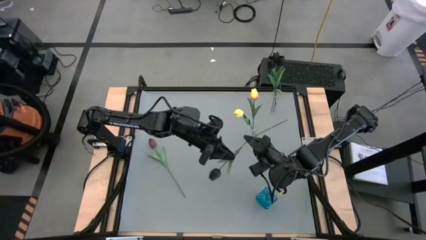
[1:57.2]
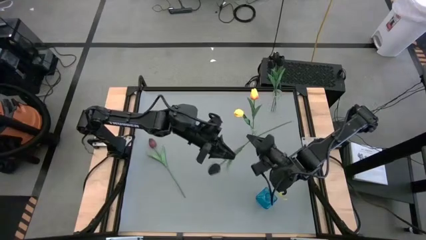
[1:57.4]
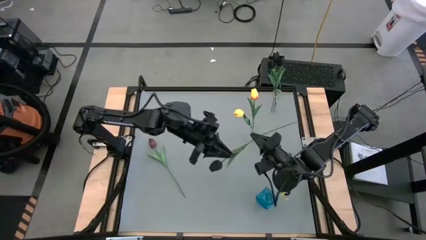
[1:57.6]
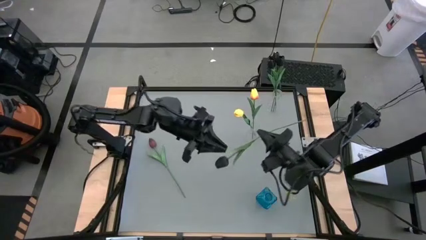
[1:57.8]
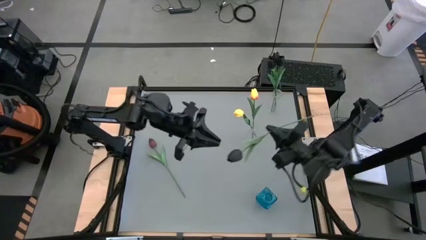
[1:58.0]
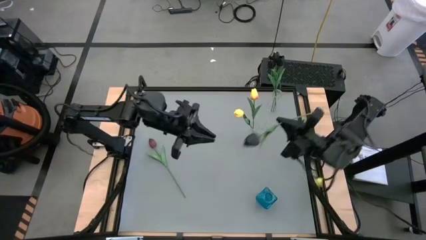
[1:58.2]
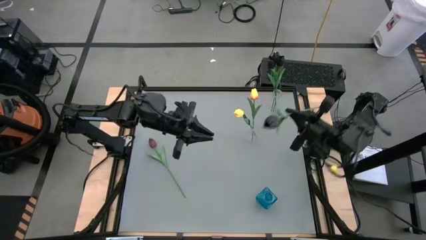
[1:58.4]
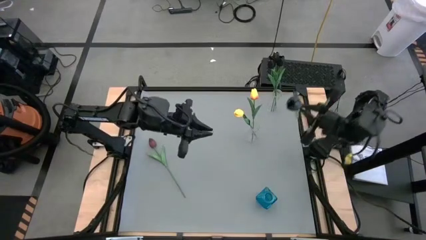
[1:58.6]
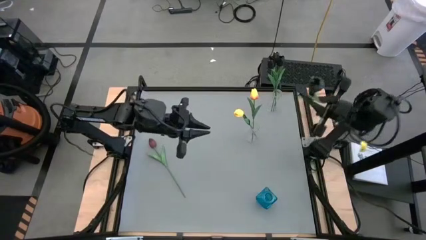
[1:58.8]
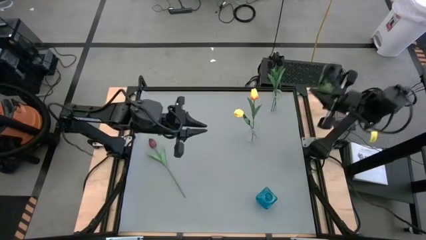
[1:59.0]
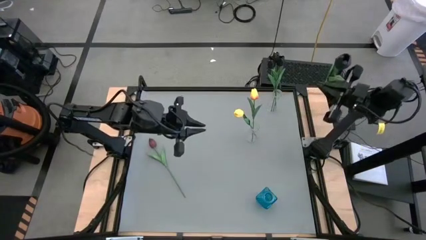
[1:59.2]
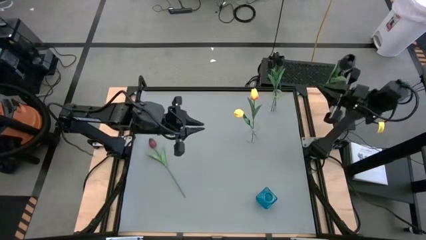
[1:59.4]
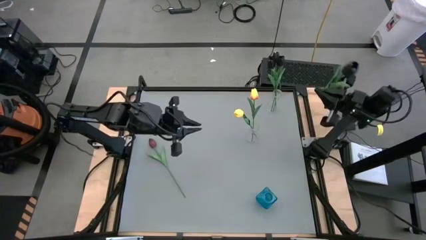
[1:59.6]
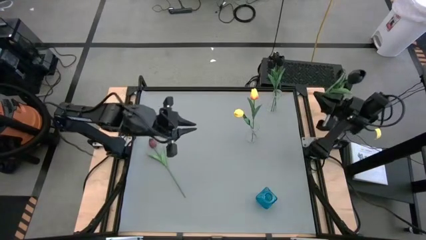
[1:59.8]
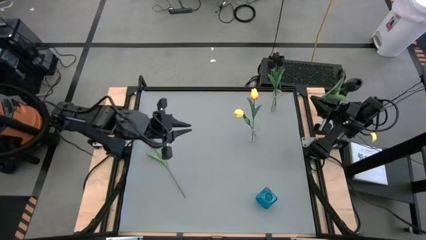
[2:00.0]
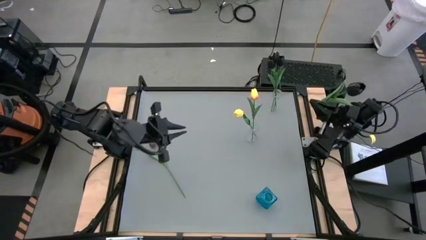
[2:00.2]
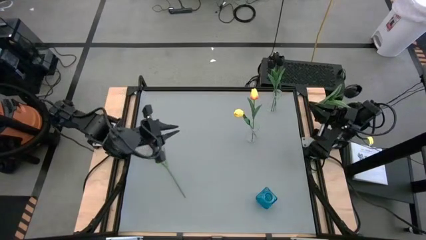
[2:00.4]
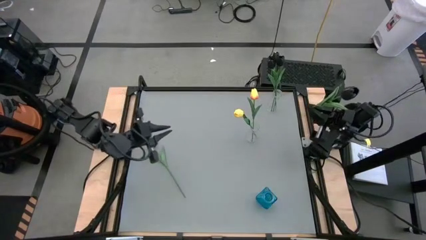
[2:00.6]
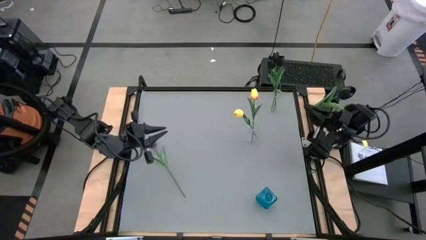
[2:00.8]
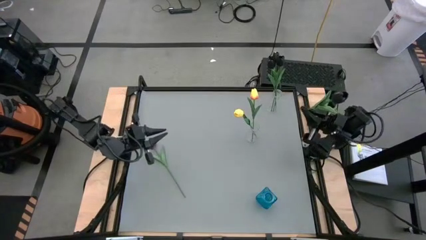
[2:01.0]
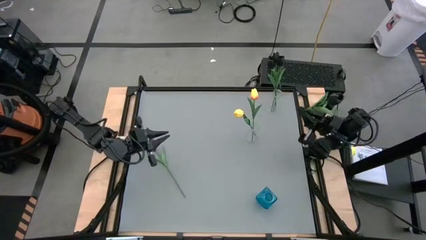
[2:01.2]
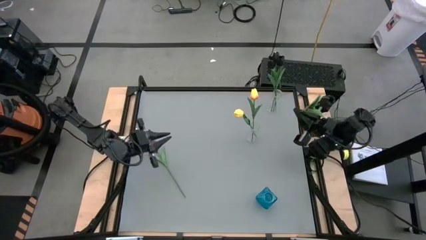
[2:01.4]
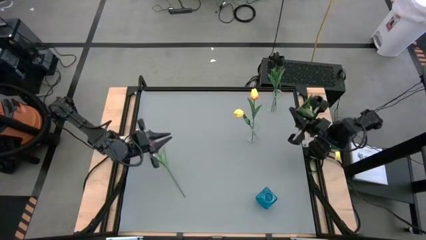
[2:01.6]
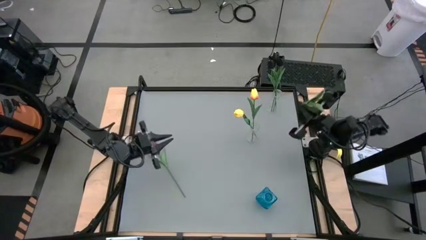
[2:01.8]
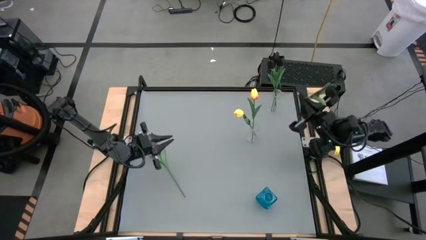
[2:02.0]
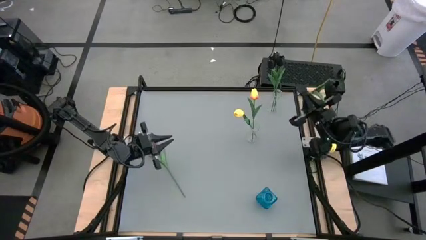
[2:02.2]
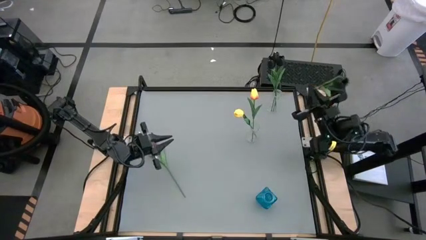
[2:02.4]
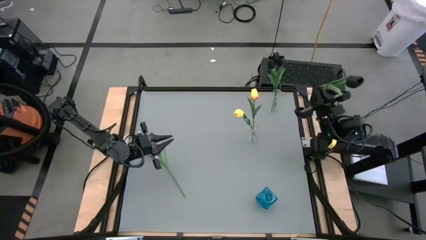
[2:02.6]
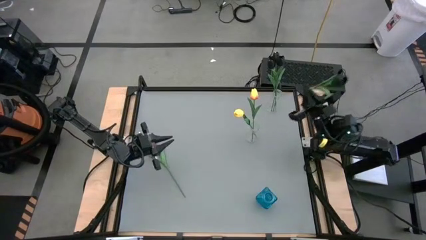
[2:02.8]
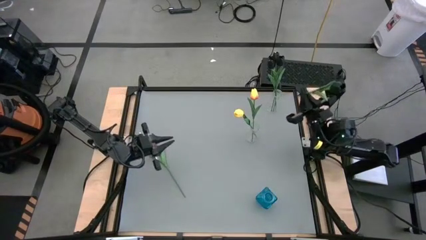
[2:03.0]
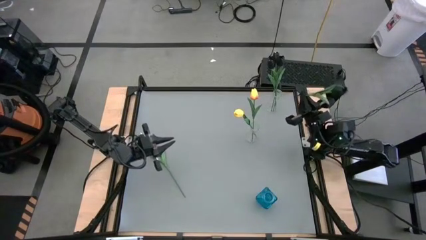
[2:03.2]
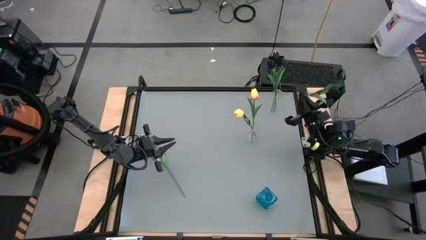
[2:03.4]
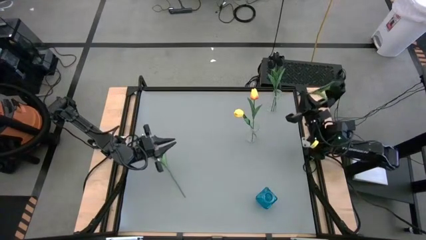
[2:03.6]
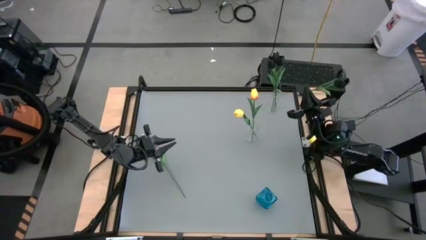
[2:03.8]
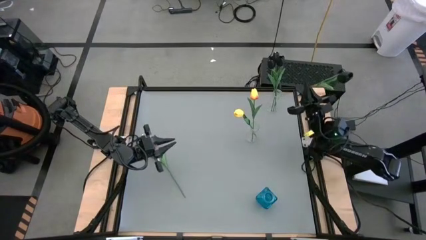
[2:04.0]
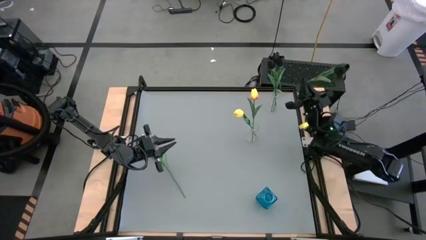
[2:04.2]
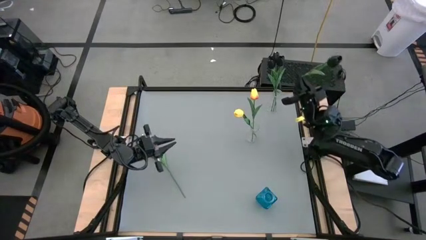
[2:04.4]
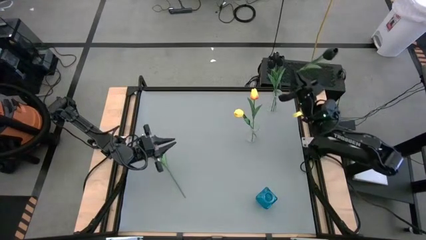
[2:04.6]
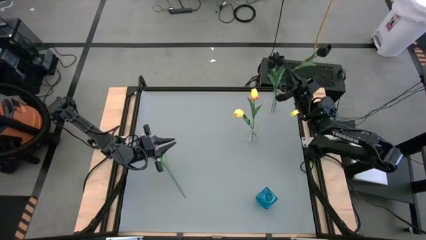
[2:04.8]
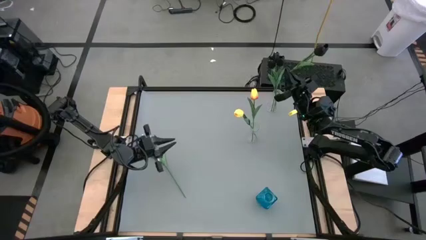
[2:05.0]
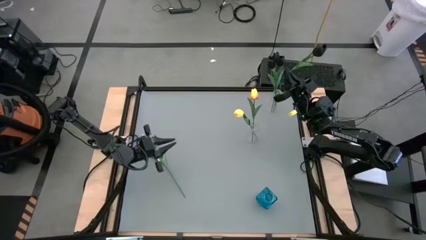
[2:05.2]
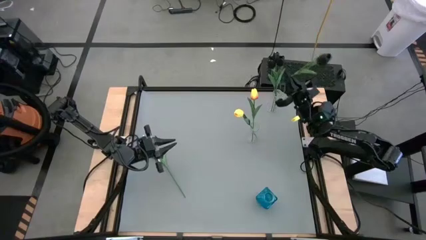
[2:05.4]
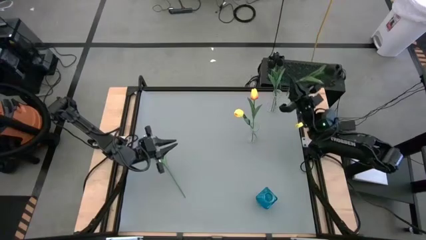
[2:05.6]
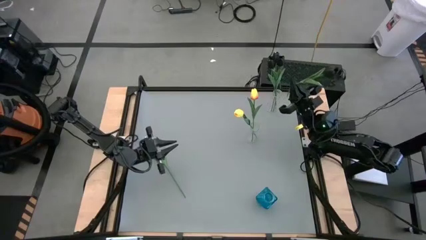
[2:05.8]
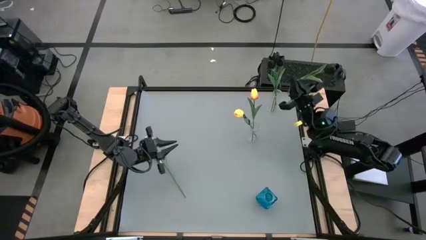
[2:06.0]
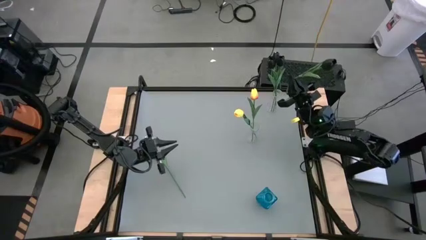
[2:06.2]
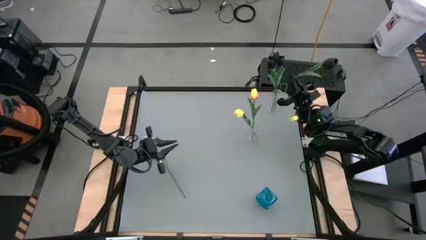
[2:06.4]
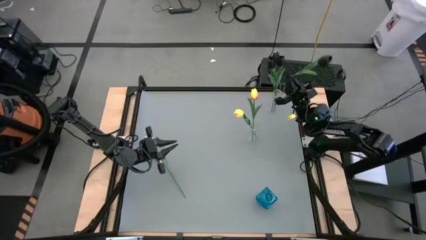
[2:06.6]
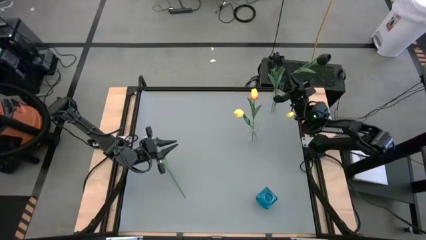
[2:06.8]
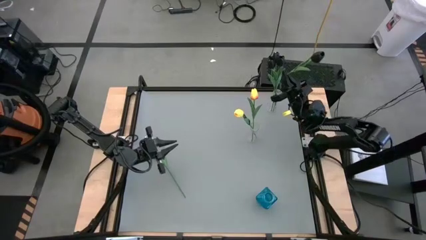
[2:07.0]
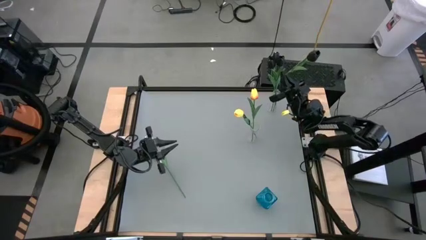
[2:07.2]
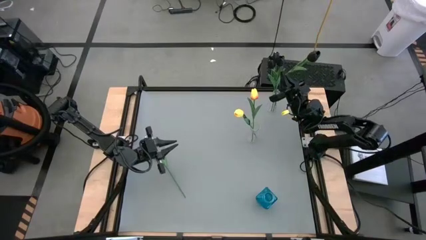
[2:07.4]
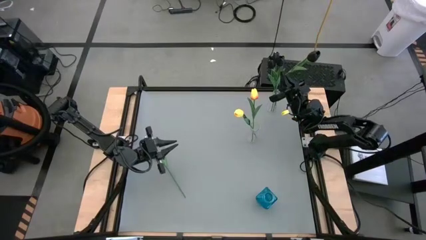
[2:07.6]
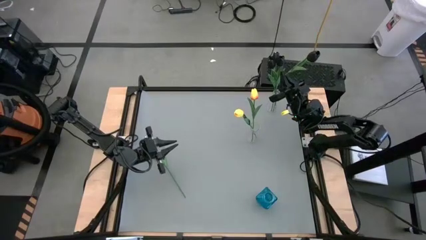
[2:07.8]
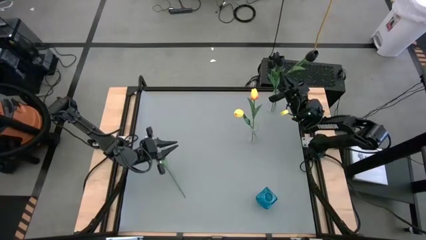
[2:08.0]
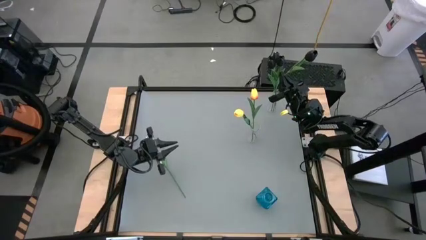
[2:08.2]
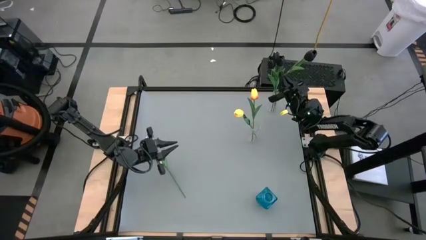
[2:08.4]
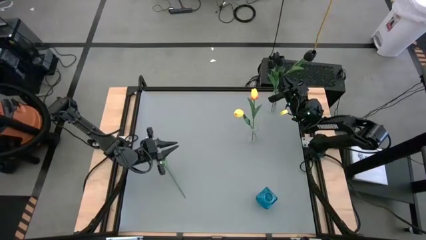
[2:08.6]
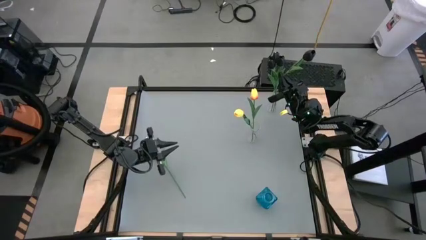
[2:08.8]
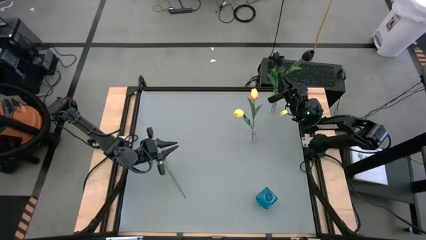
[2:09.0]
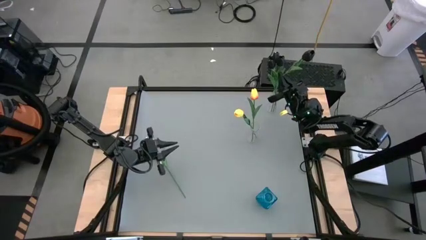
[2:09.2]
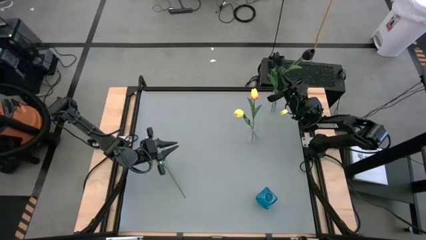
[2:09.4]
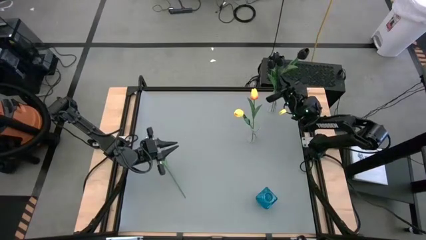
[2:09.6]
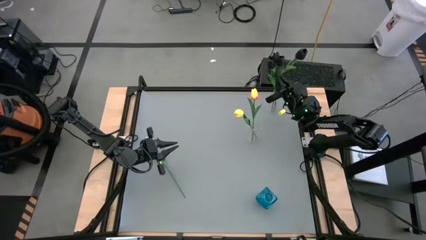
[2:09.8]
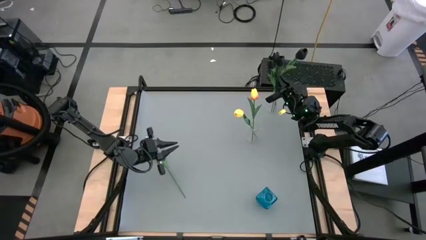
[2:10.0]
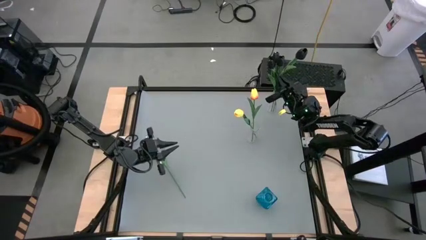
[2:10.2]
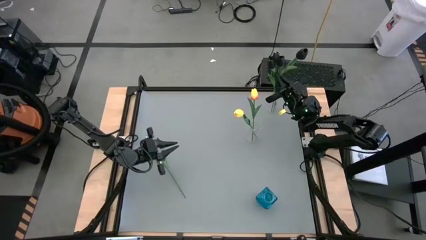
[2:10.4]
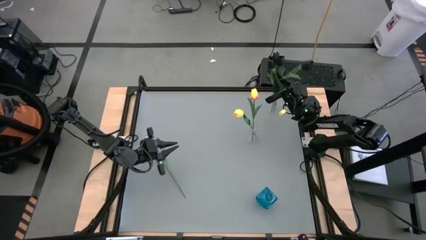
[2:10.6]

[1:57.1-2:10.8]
Task: Sort flowers into vase by color
Put the black tulip into the top transparent vase

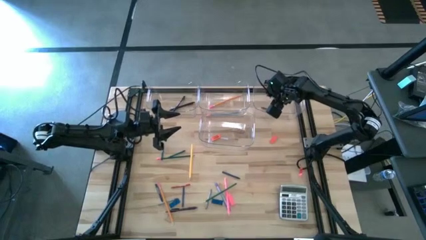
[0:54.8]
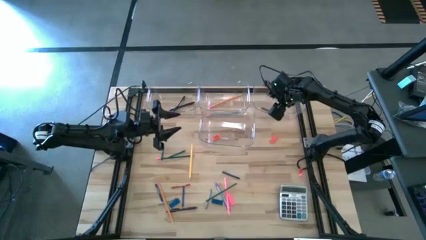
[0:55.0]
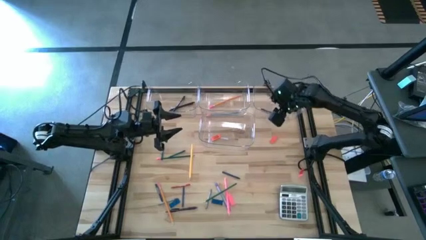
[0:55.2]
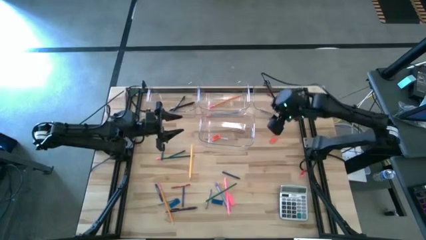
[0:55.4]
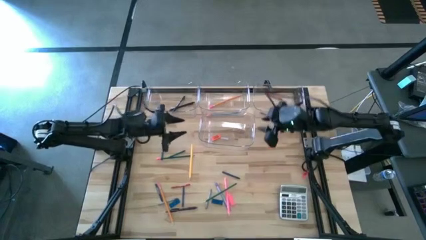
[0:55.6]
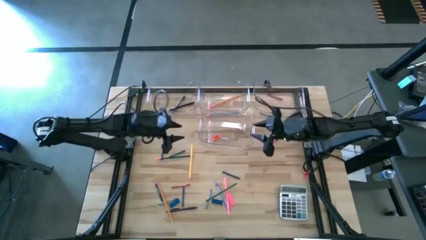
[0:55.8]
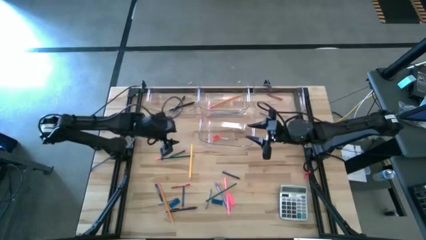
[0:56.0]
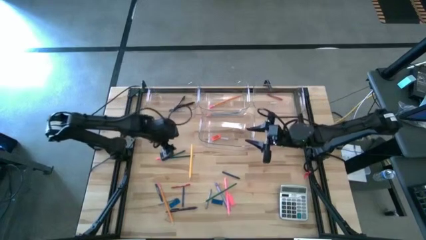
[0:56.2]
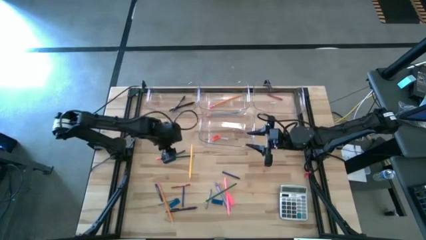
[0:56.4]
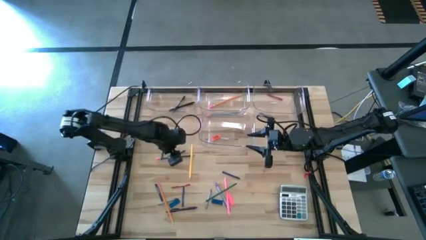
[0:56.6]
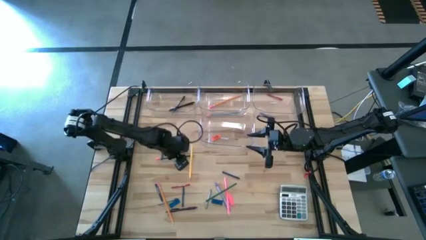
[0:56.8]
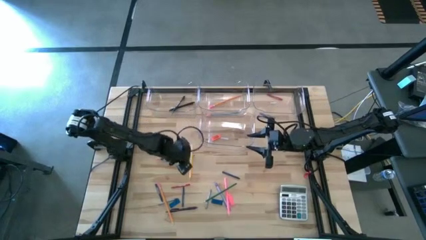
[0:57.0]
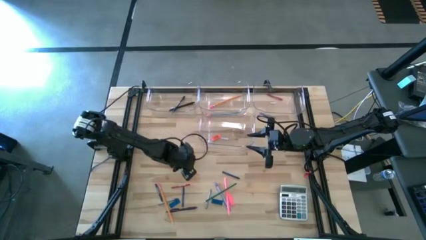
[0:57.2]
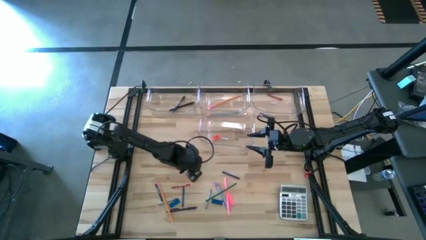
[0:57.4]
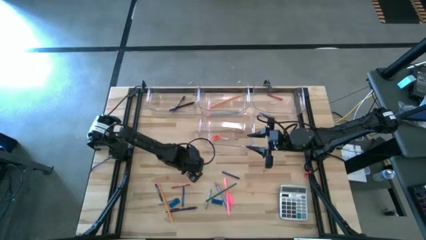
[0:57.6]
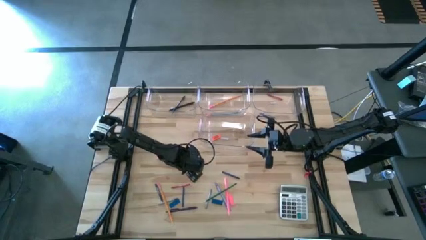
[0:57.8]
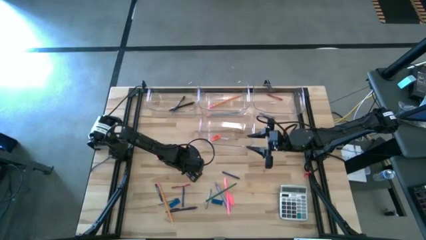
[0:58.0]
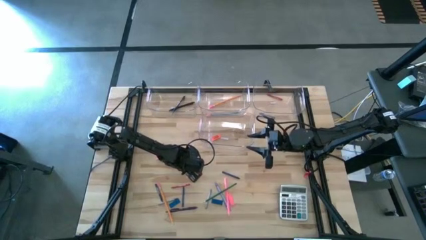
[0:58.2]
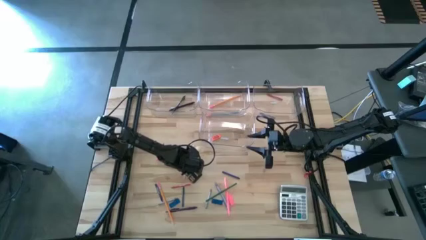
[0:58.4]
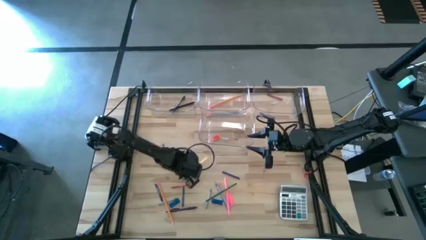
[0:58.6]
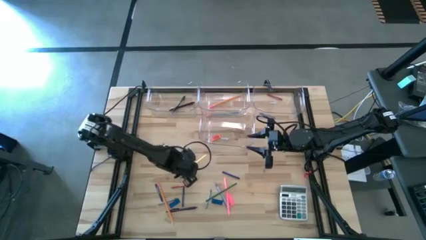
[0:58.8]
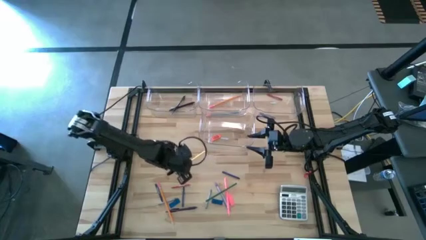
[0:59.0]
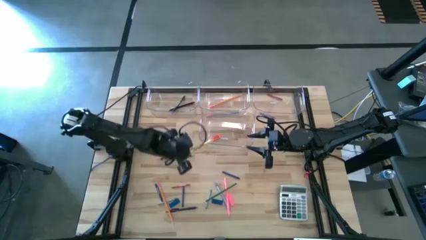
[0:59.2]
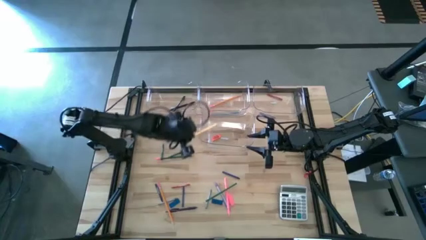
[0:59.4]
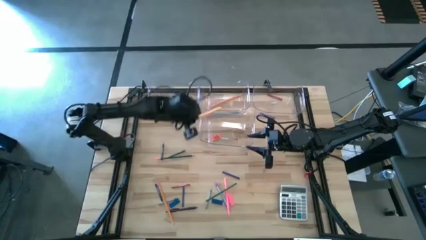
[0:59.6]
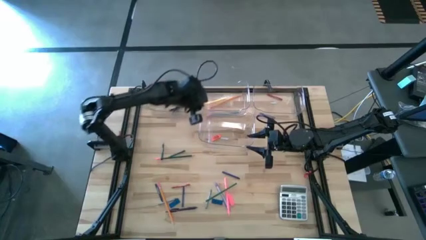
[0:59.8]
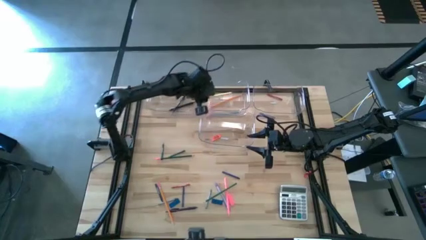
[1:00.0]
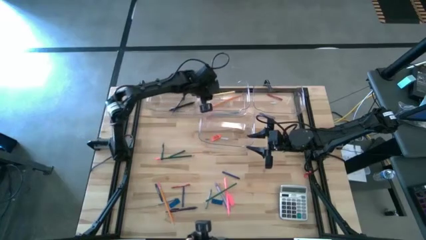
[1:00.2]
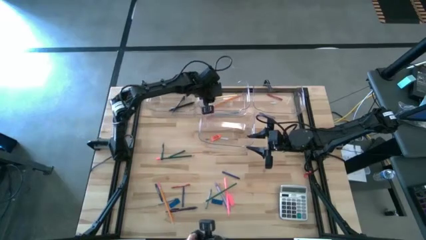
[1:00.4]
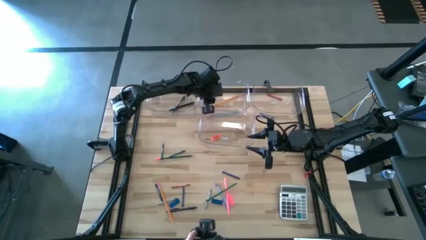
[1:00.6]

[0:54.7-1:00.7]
Task: Sort crayons/erasers/pens/pencils in bins
Put the yellow pencil into the top center transparent bin
